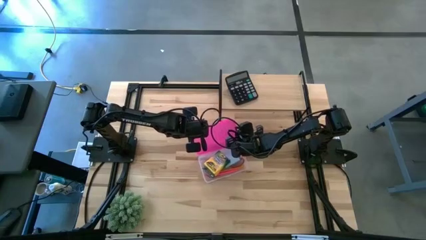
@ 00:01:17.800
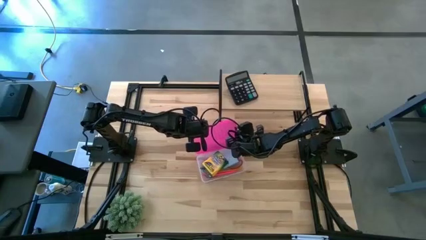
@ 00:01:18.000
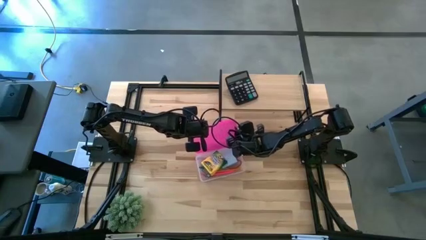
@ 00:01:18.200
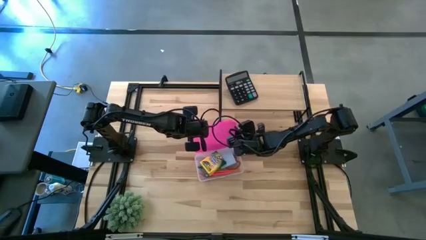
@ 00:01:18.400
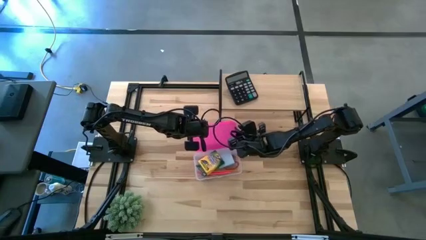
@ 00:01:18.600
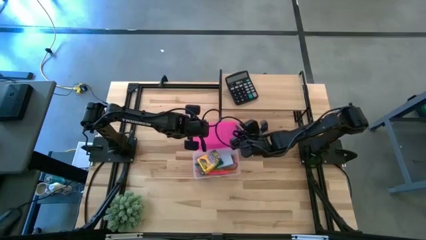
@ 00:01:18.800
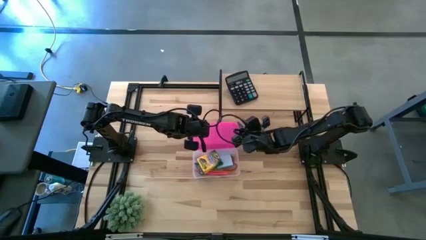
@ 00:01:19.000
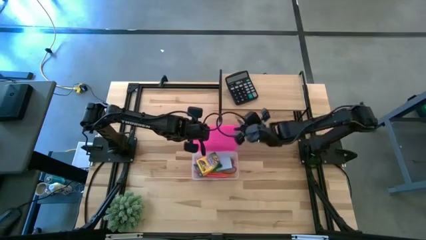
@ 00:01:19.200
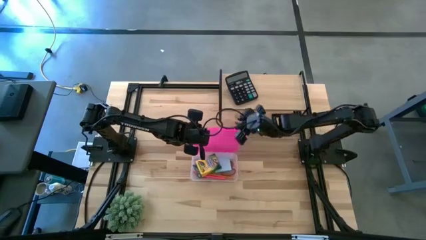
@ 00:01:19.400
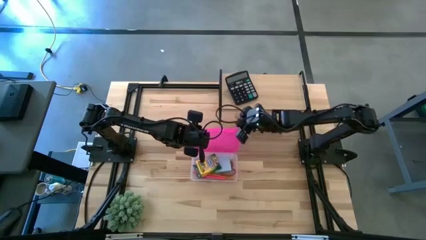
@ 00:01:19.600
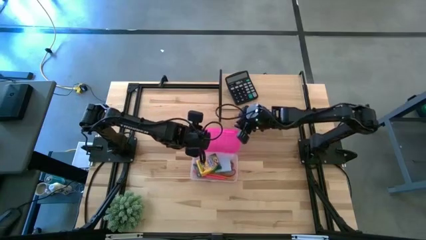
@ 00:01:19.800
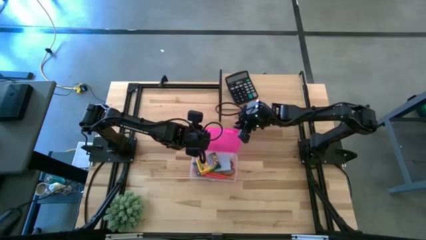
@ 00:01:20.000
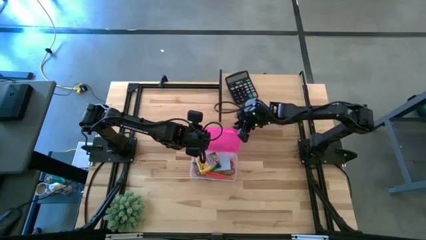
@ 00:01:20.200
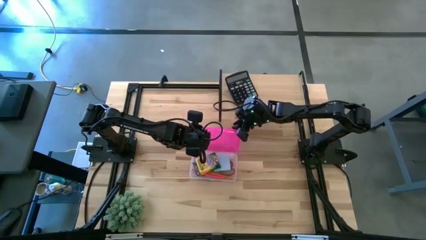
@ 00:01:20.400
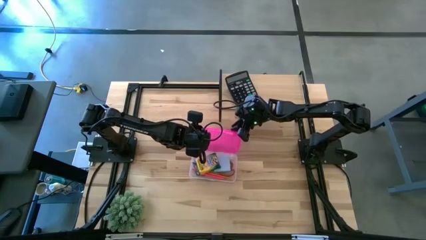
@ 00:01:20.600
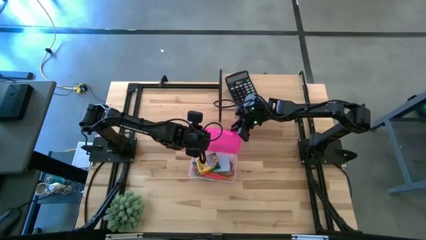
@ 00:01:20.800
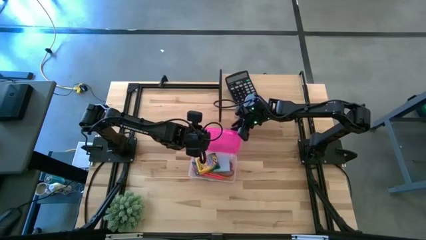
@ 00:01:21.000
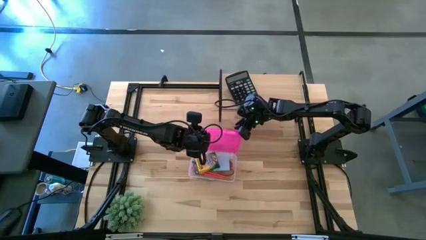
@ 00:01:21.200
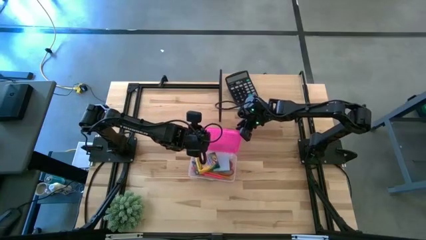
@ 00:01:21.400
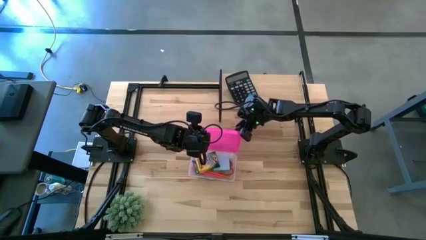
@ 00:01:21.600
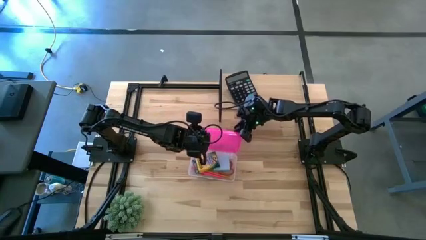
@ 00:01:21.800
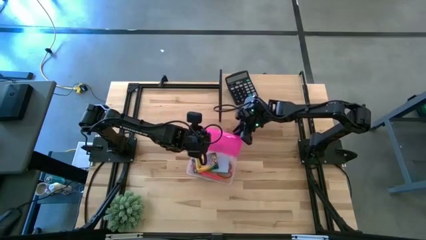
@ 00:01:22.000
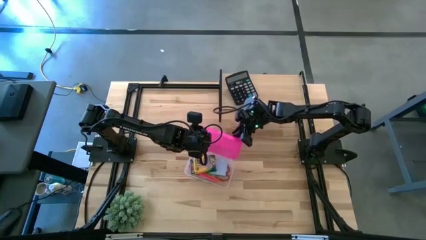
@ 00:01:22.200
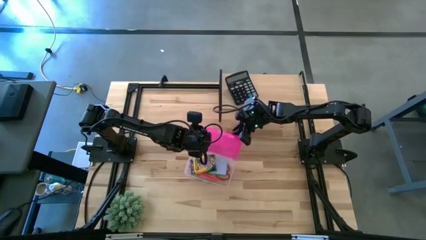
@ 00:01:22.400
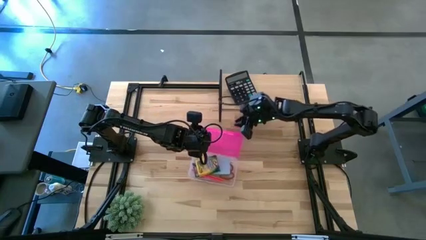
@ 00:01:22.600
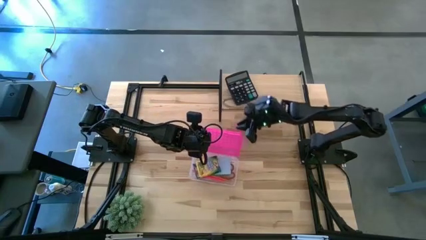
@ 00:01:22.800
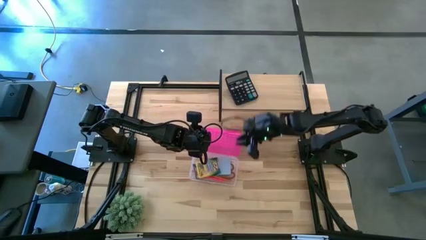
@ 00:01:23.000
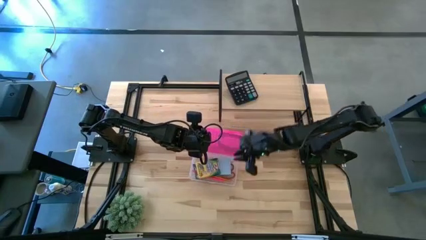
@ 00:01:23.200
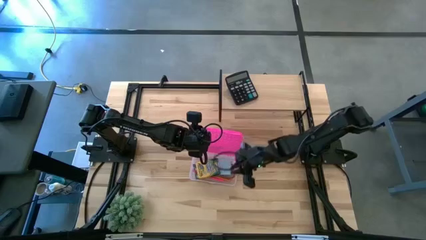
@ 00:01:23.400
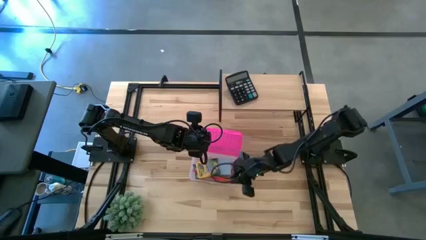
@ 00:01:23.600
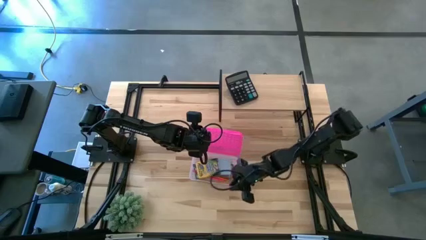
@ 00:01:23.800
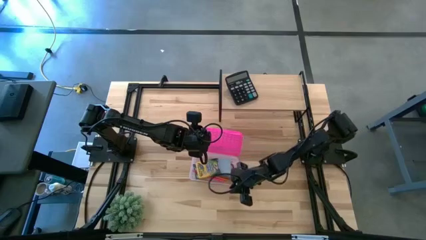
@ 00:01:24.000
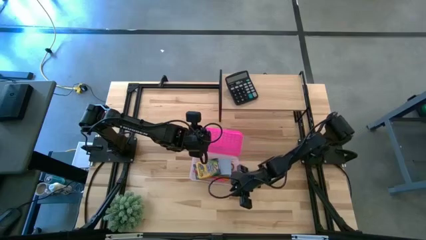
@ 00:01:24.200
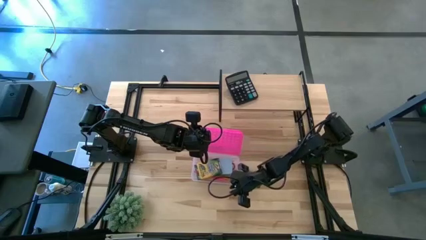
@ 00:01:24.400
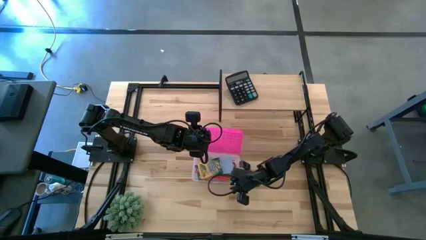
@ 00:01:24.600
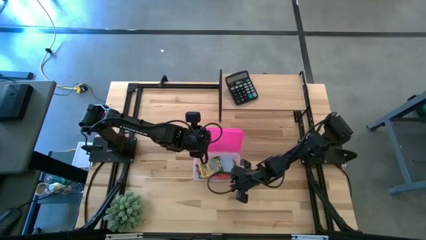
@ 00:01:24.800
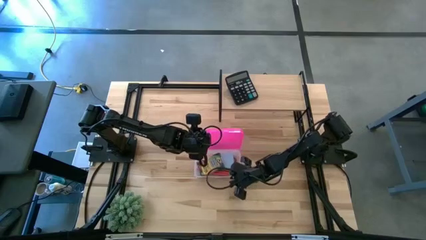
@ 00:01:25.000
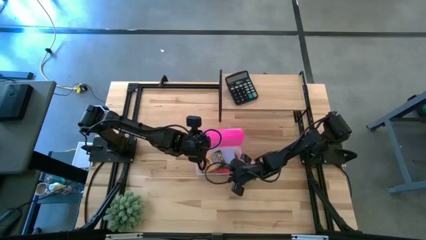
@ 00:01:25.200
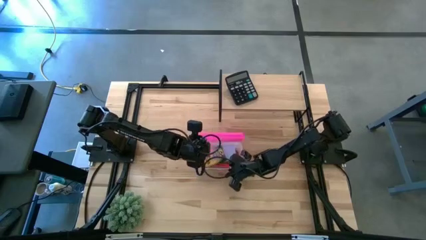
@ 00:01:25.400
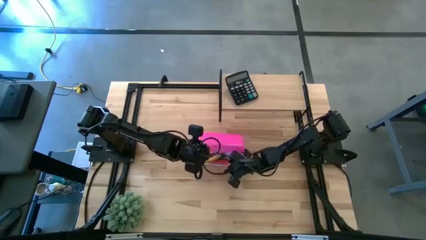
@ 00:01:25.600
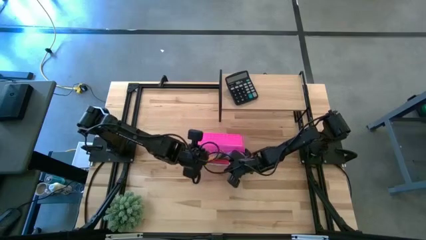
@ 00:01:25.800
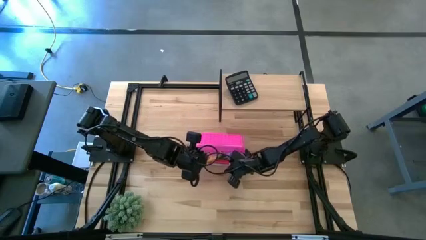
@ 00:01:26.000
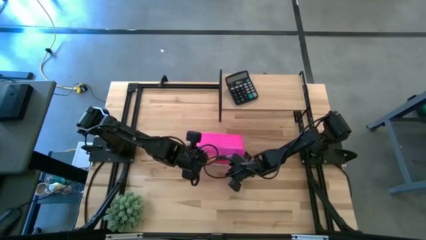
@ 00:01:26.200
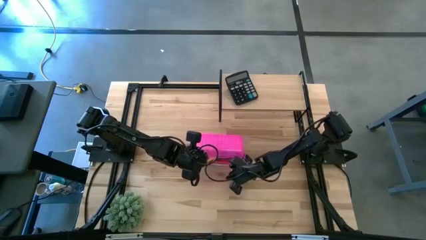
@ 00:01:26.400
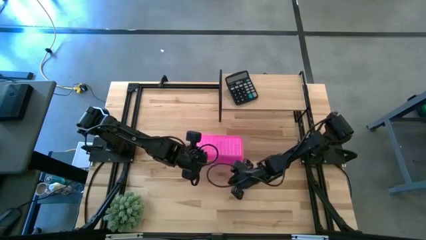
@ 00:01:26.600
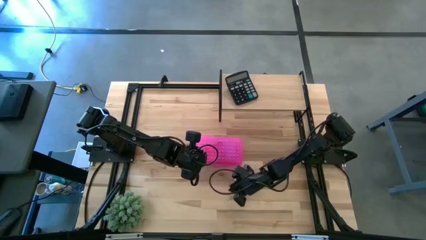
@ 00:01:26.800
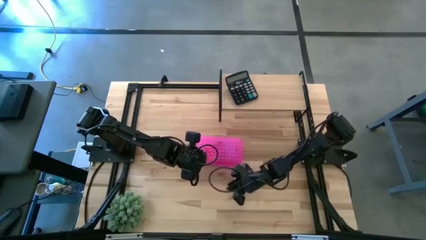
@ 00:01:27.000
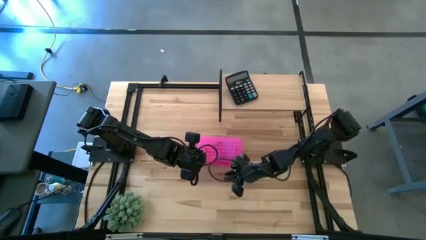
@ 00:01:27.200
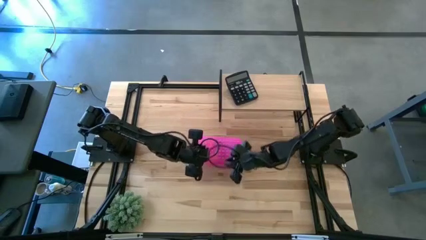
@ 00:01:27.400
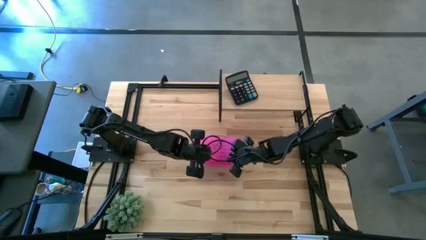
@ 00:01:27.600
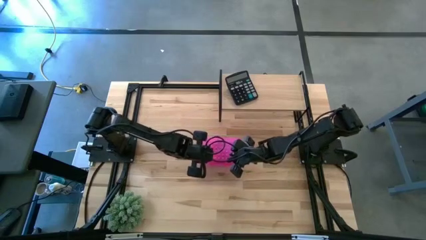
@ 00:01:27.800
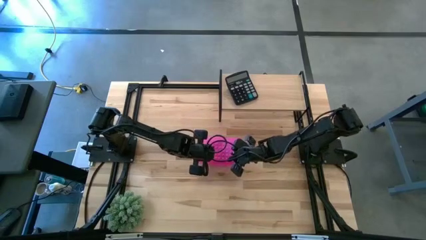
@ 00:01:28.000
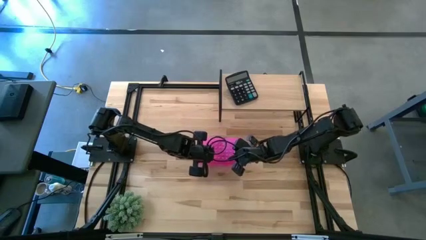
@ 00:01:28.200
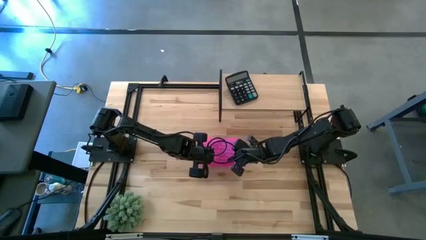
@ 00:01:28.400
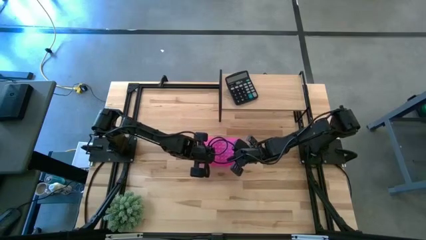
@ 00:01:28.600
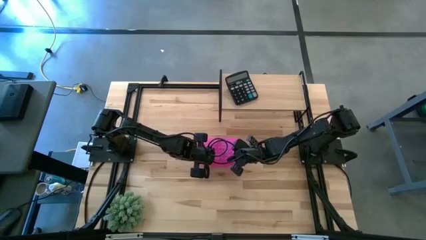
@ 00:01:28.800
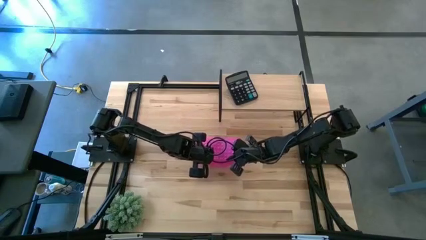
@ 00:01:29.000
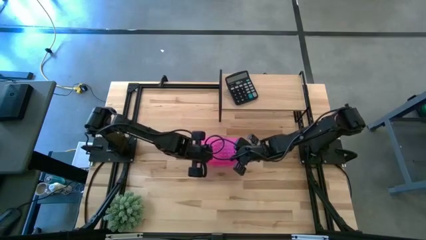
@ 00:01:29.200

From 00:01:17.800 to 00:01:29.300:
Task: Pack school essentials
Close the supply box

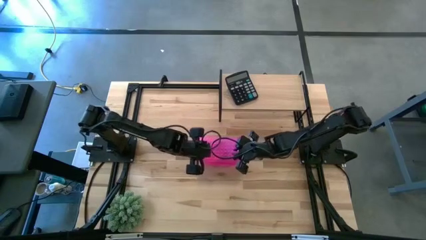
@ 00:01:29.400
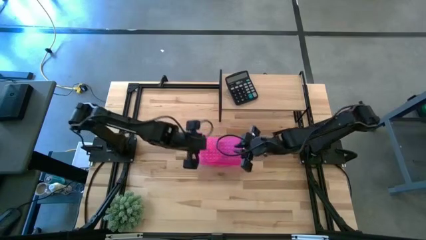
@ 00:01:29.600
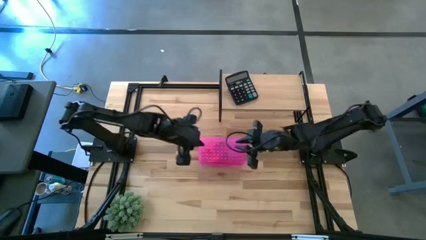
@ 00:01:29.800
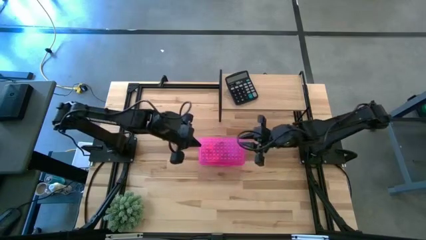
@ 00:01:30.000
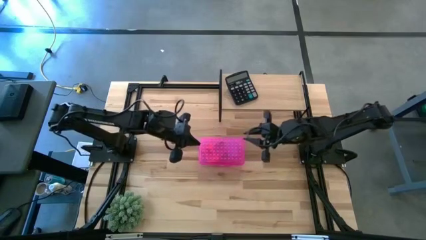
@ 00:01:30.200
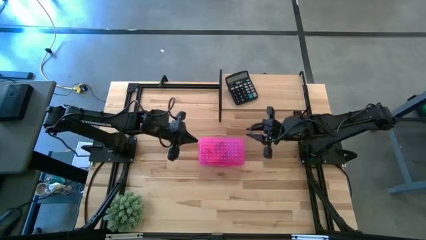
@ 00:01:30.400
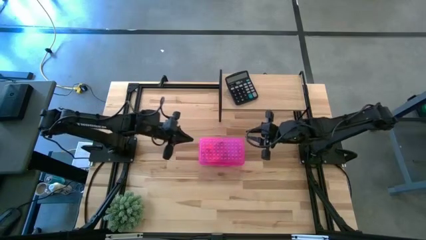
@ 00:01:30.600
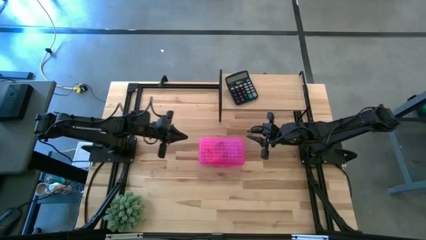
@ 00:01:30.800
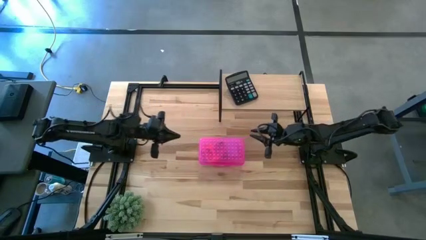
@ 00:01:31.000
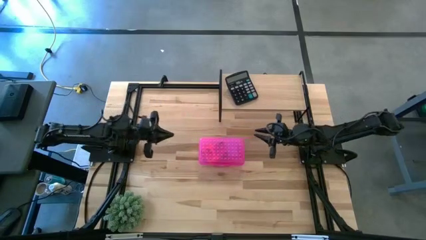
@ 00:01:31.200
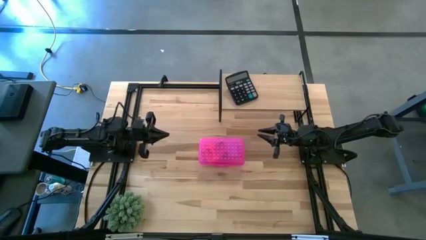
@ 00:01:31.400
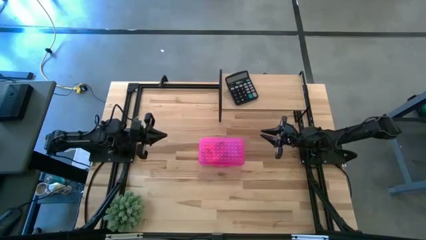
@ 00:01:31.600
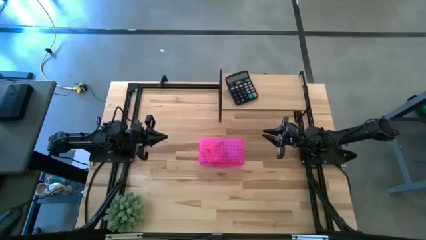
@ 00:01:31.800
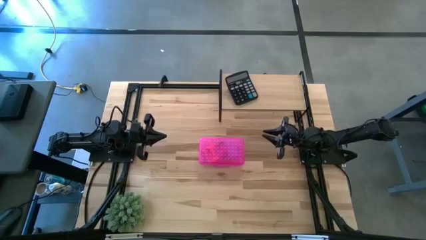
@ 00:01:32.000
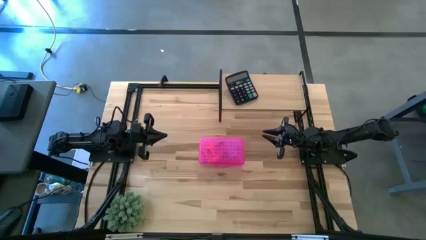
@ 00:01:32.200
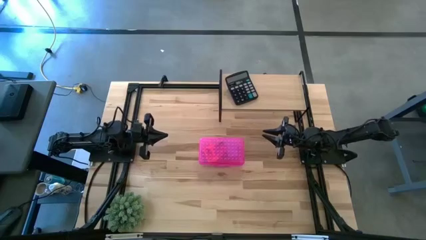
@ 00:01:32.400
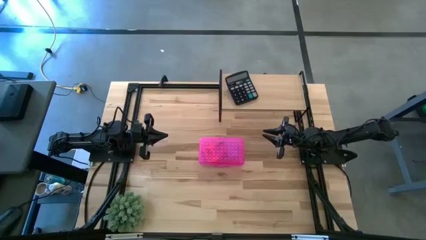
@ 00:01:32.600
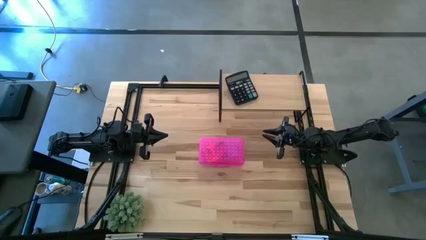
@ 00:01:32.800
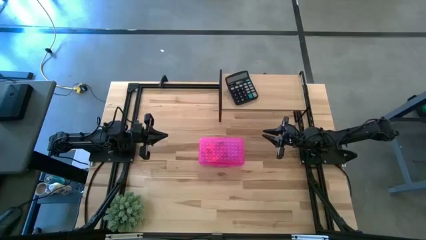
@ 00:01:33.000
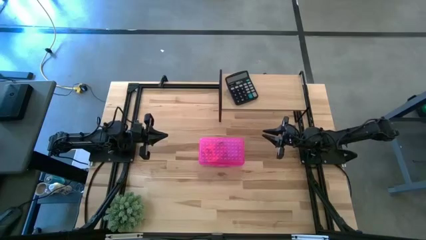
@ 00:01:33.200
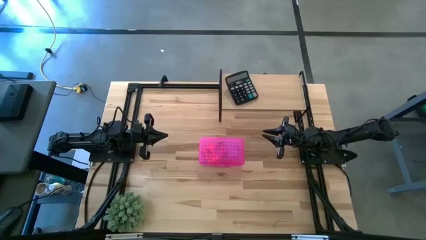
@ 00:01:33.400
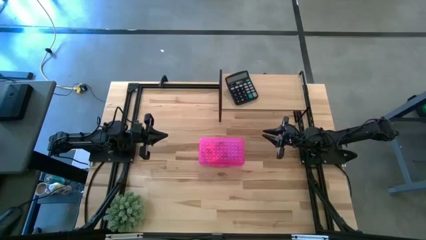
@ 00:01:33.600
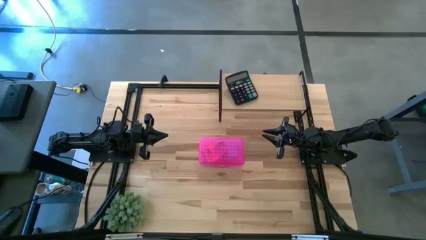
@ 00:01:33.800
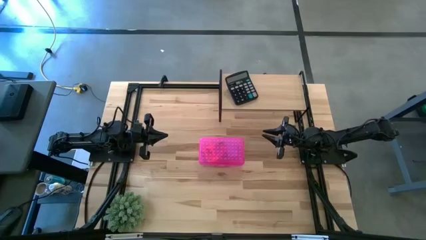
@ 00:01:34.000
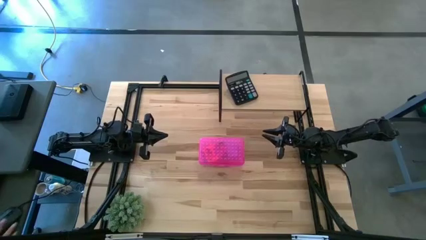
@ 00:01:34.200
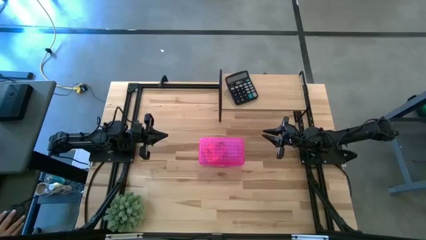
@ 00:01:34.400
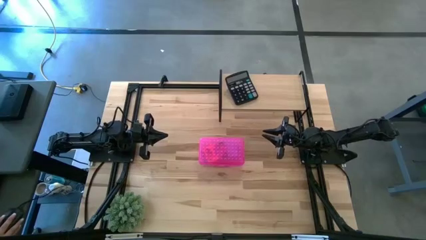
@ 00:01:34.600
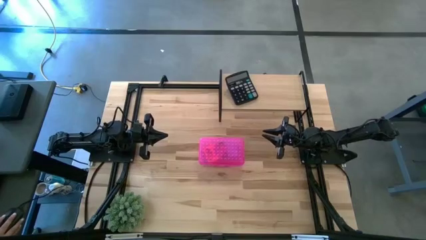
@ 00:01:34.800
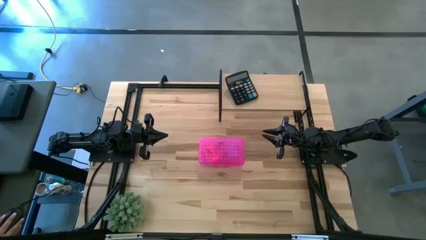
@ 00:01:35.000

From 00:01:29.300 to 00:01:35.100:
Return to Home Position
